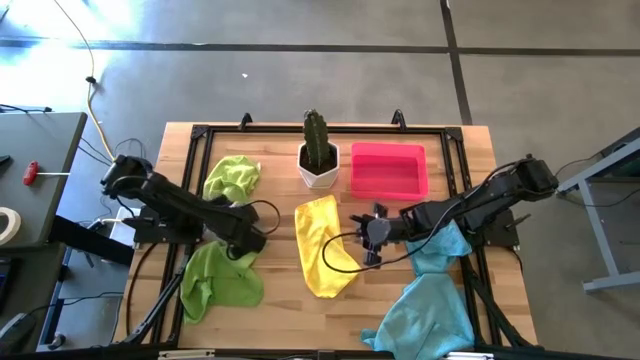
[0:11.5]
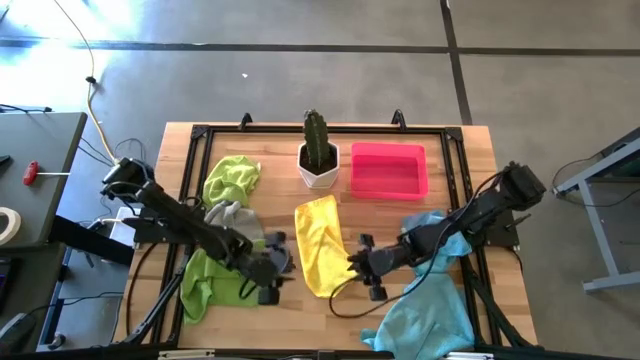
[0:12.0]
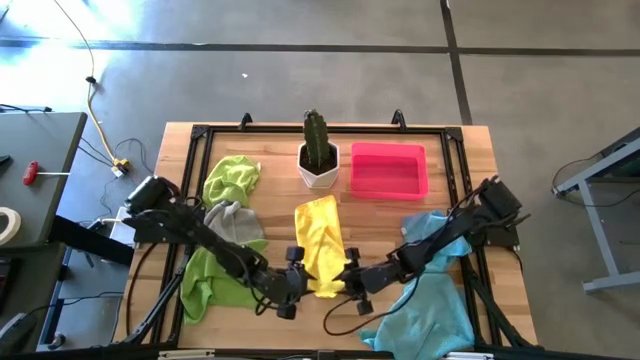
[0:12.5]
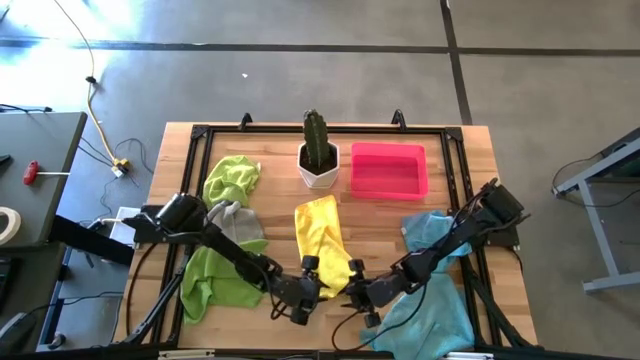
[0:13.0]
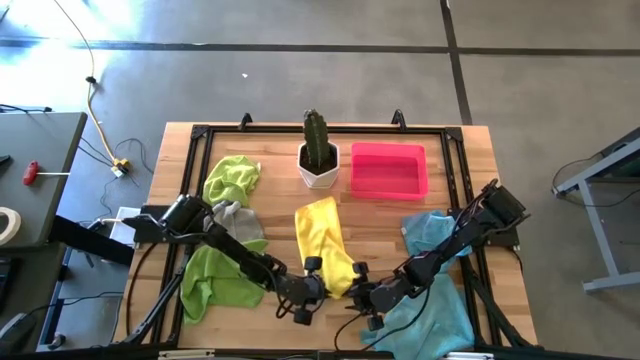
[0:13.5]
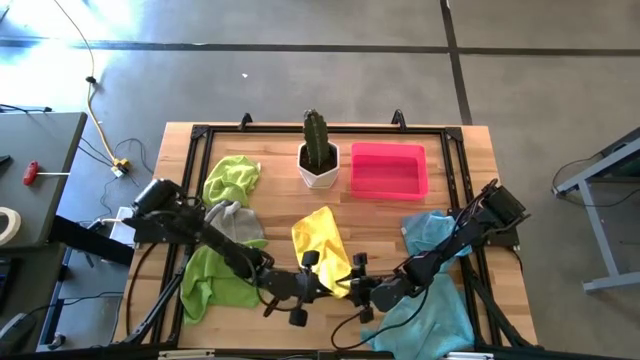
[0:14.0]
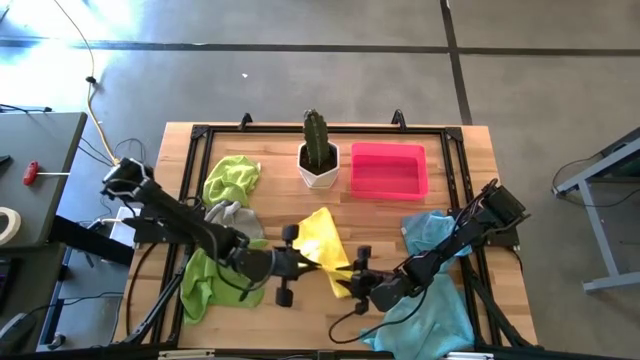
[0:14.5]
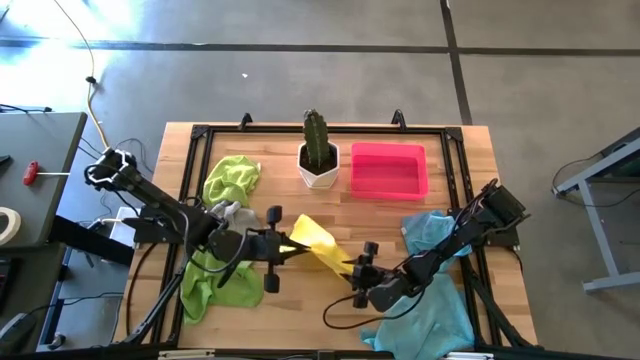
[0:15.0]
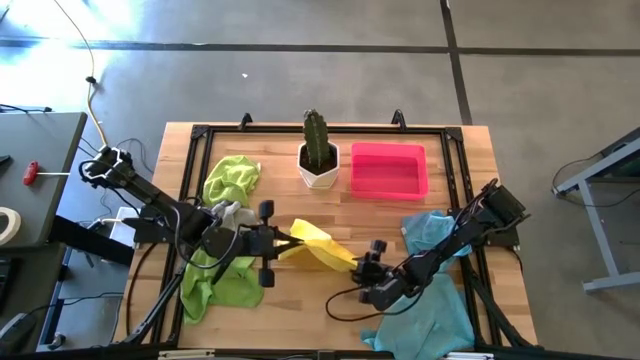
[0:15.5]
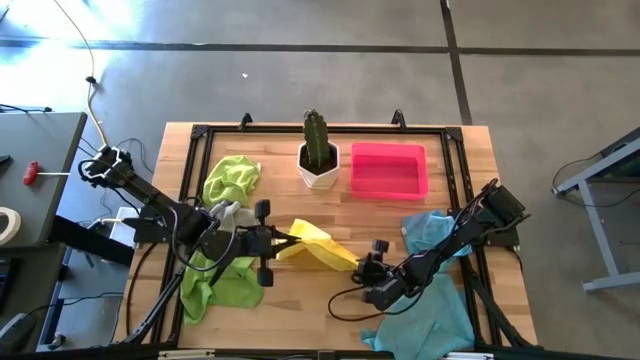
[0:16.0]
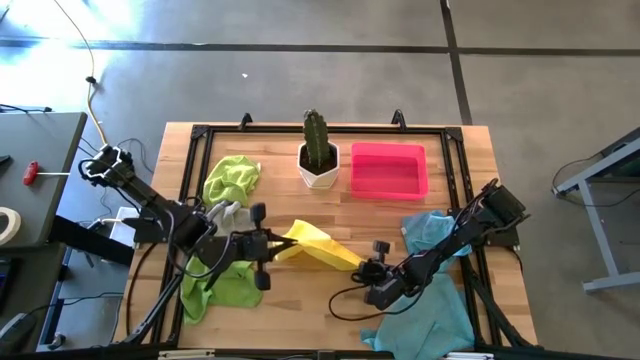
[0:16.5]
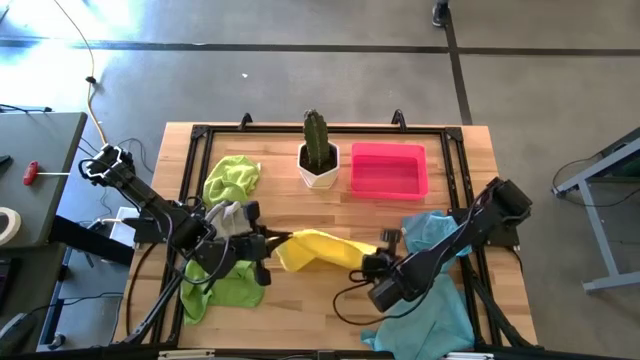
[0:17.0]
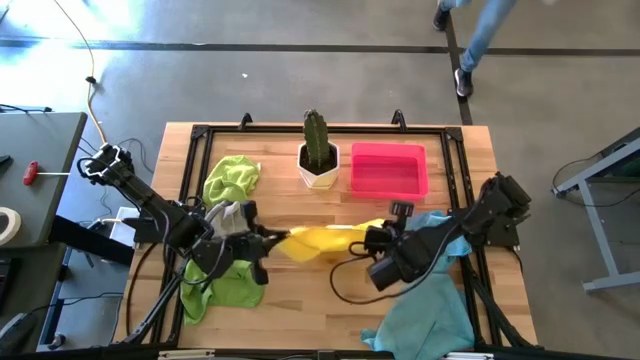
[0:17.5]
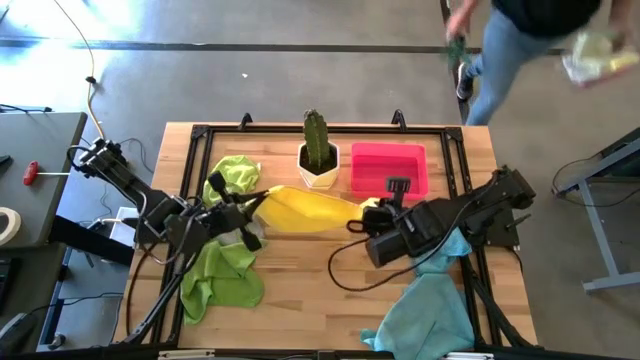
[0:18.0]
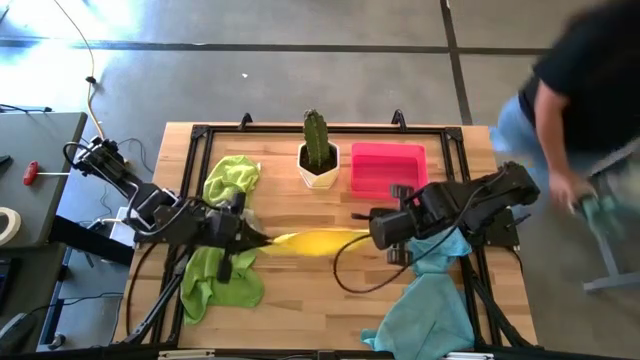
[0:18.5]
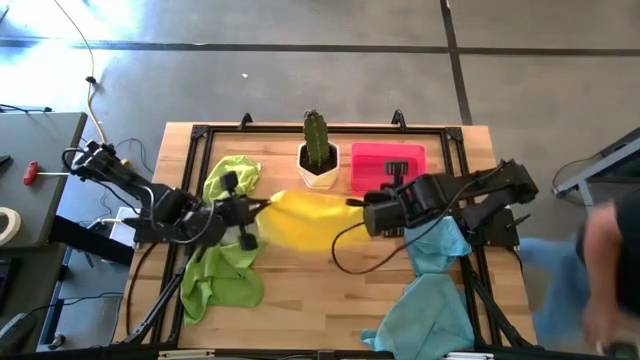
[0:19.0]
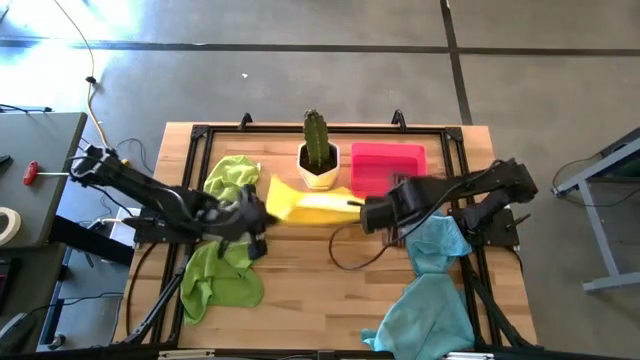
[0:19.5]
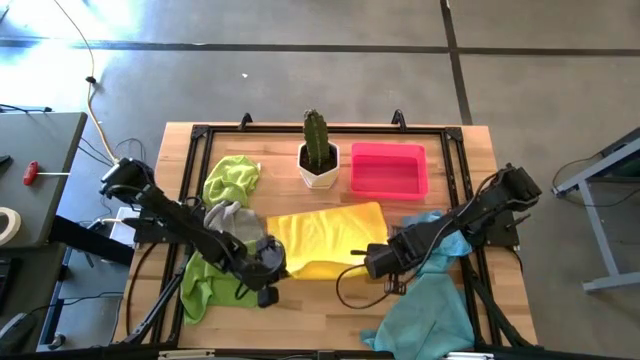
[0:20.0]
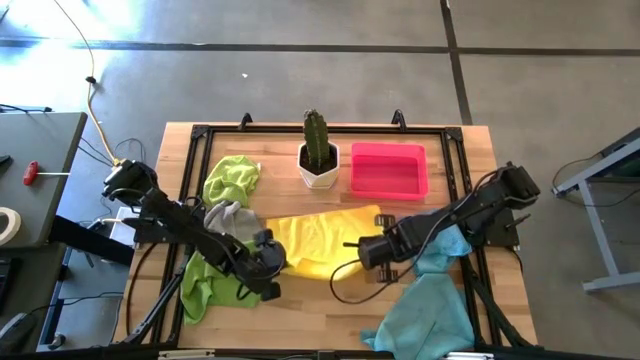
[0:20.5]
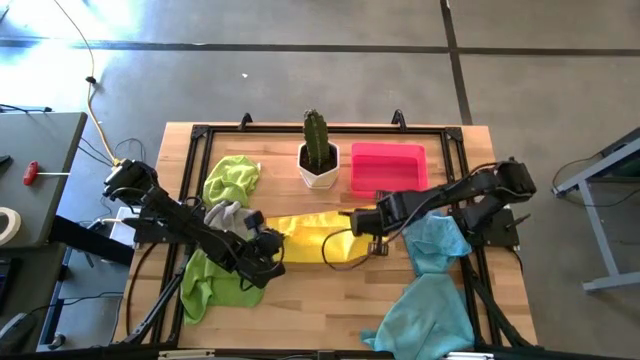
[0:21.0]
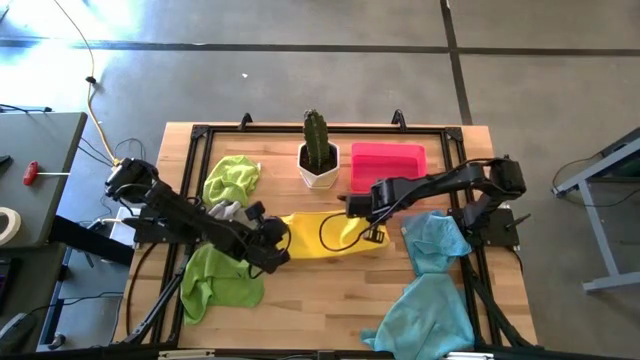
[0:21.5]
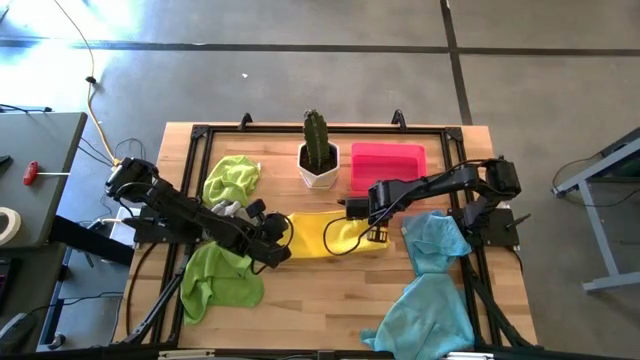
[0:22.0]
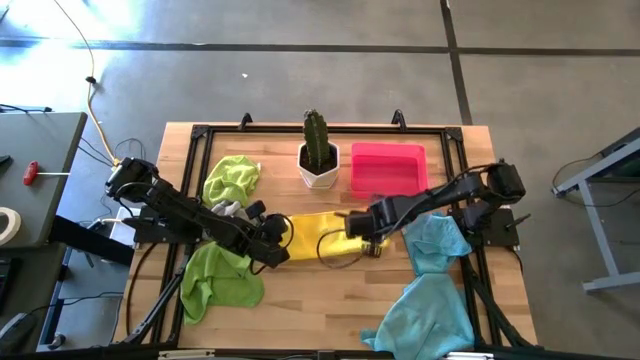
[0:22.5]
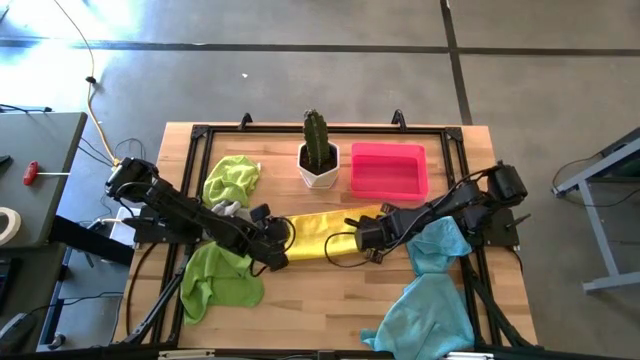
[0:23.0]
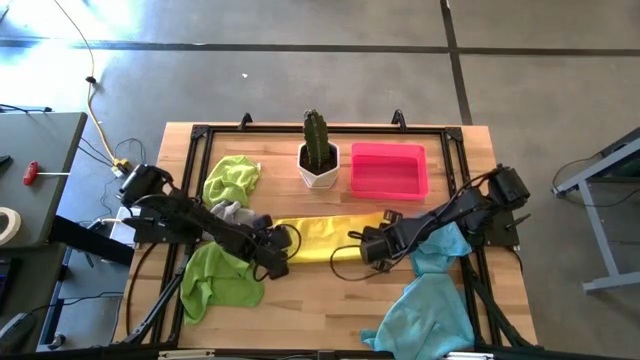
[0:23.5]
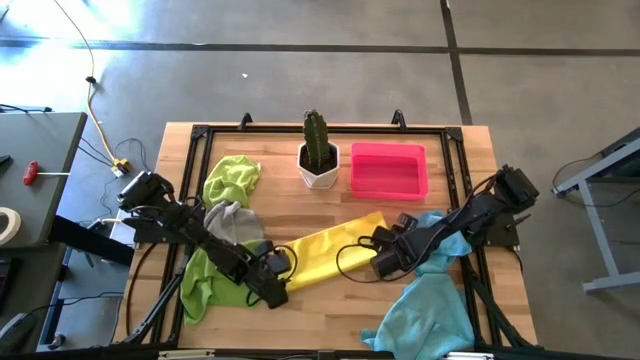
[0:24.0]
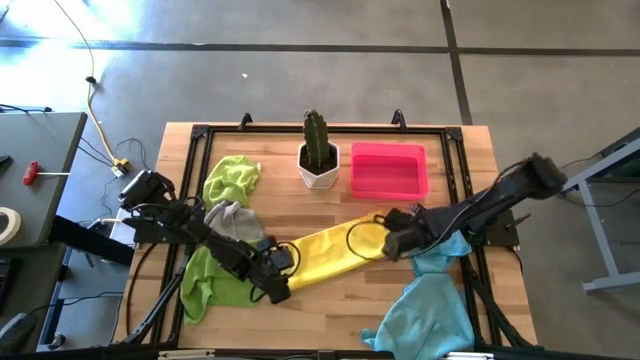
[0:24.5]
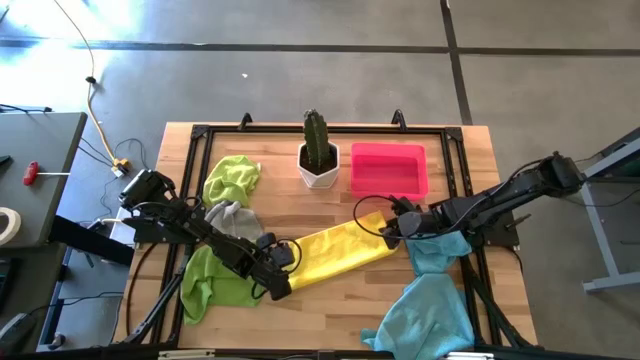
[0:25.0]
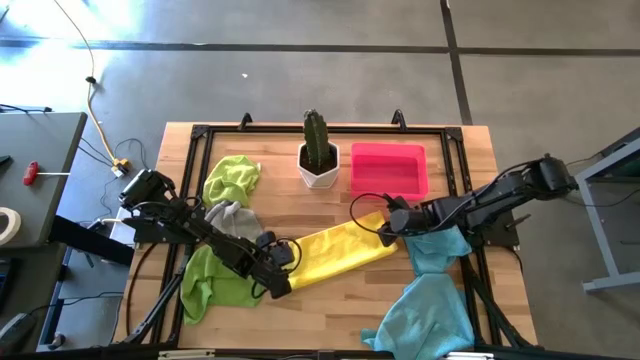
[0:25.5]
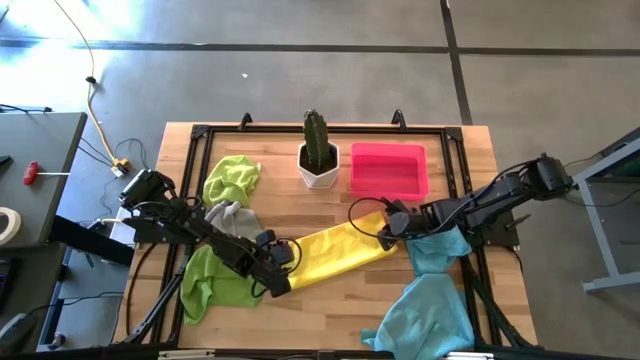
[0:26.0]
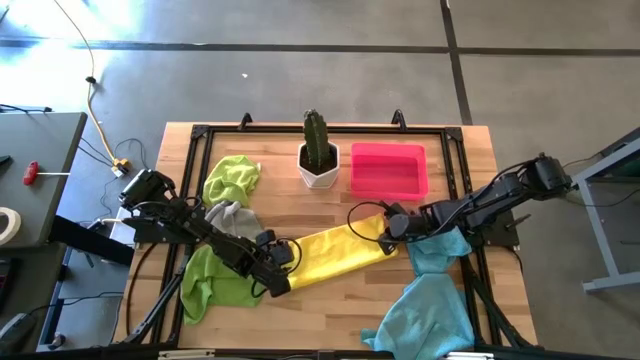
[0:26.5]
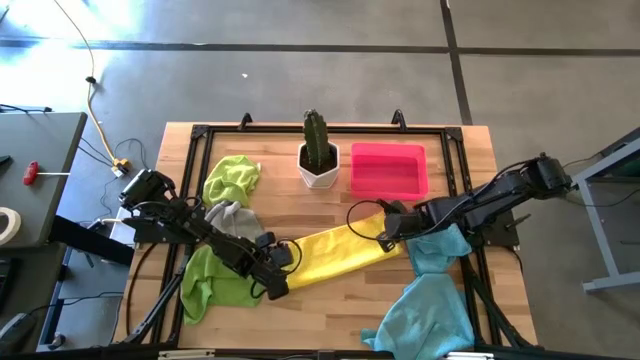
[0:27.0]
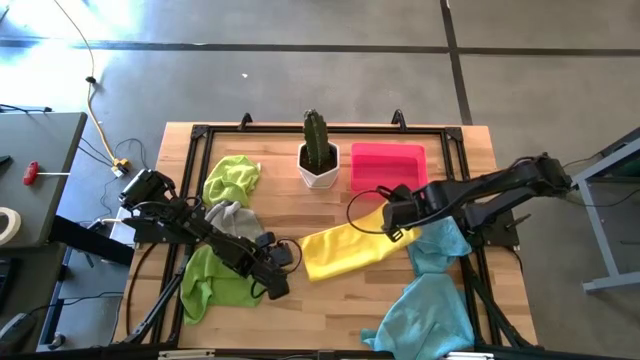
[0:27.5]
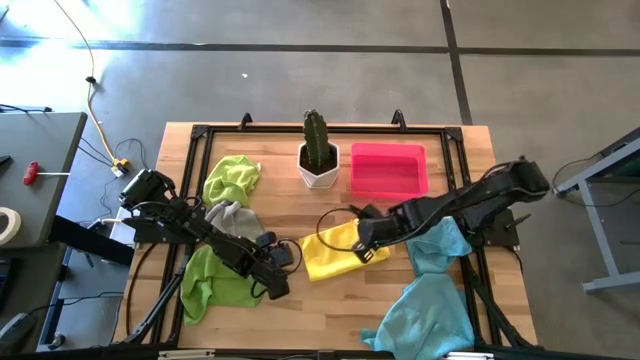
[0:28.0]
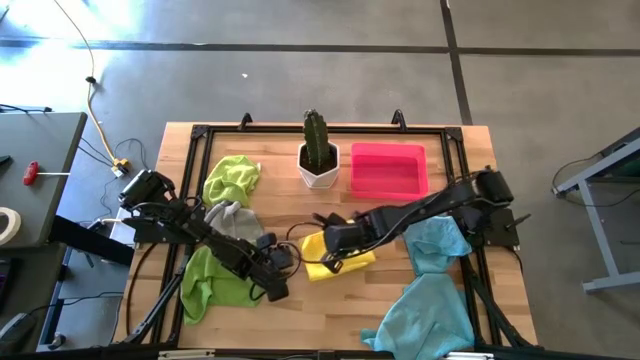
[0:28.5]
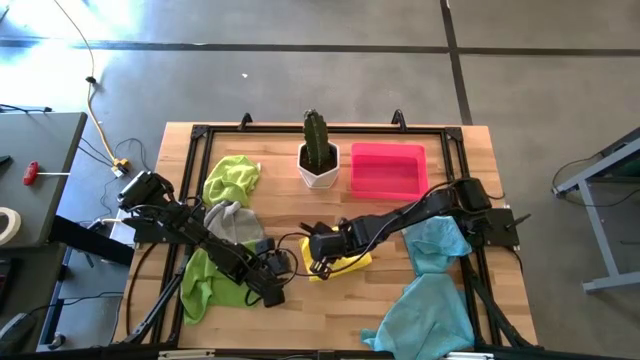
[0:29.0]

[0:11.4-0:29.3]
Task: Fold microfiber towels
Fold the yellow microfiber towel
